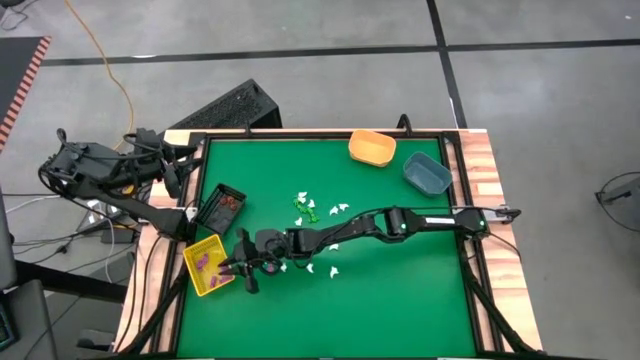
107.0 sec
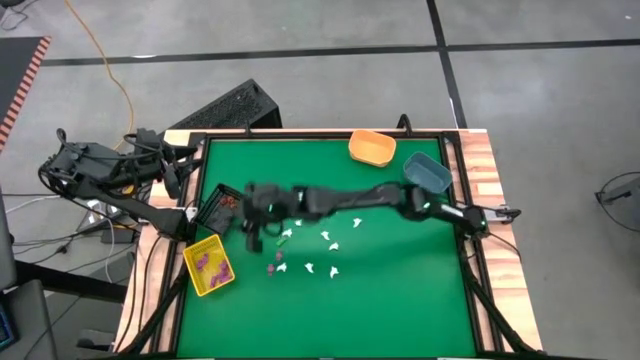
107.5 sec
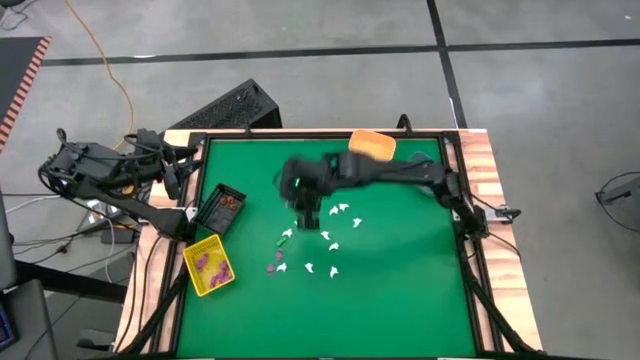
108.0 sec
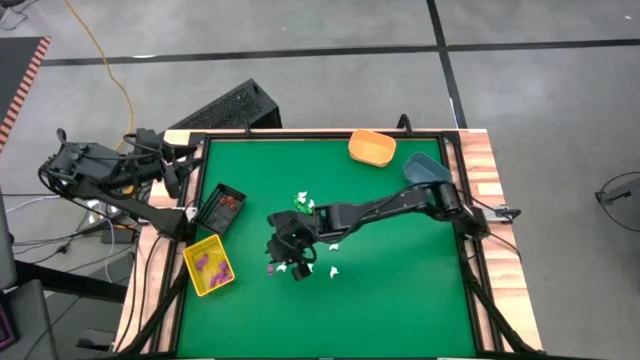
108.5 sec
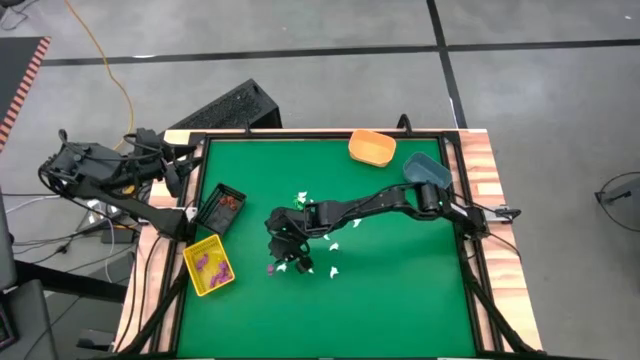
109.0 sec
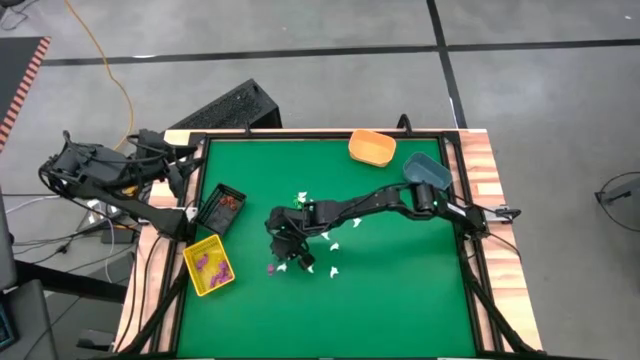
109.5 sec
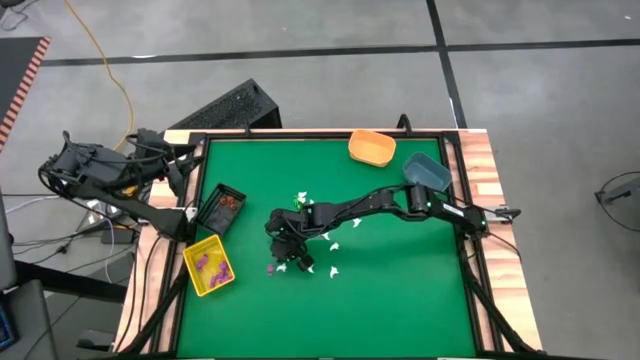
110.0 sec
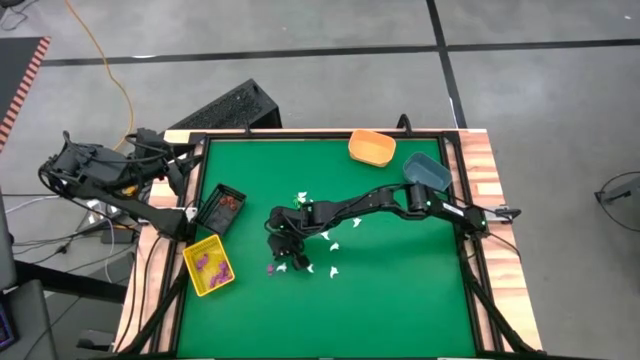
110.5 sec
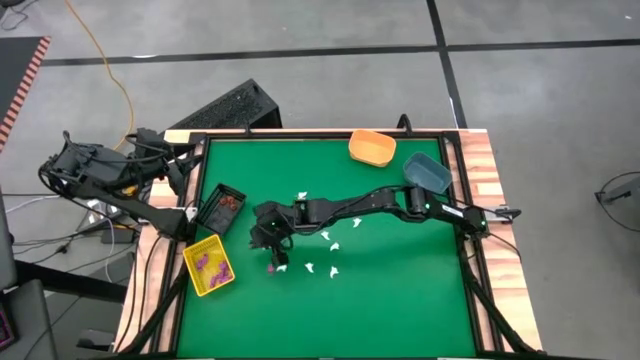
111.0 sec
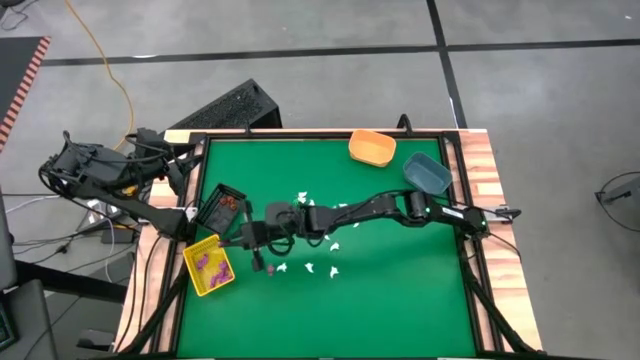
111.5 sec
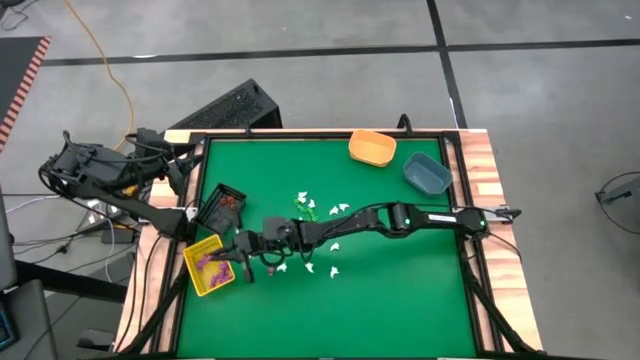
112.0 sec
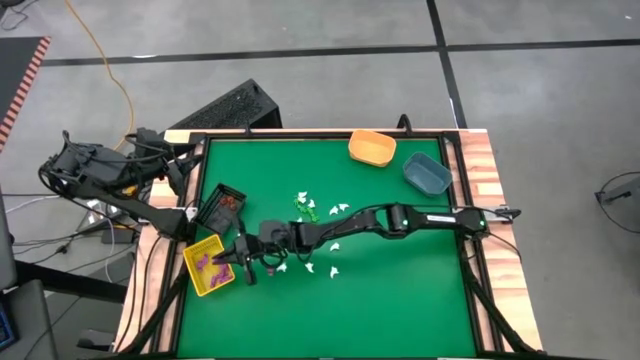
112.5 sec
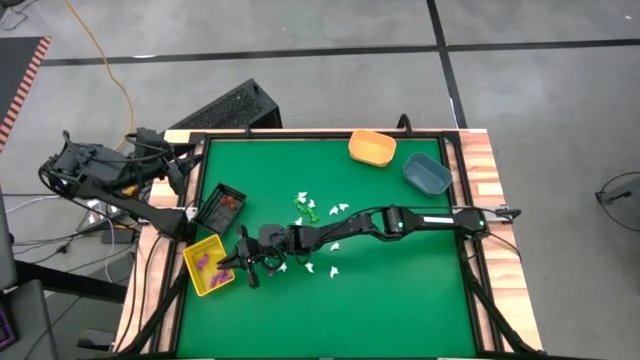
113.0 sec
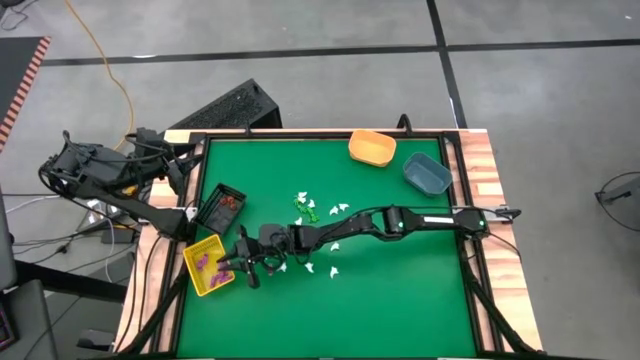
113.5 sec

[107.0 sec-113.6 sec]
Task: Sort Halloween decoration
Put the pink skeleton toy into the yellow bin

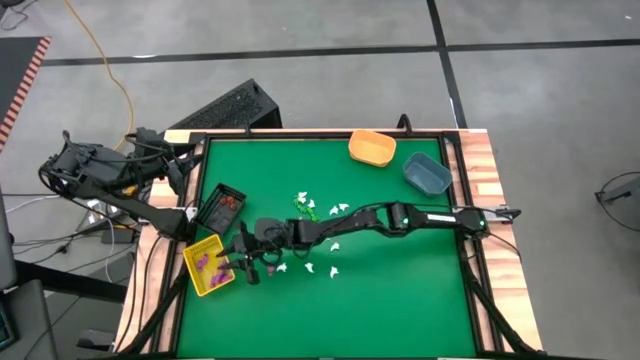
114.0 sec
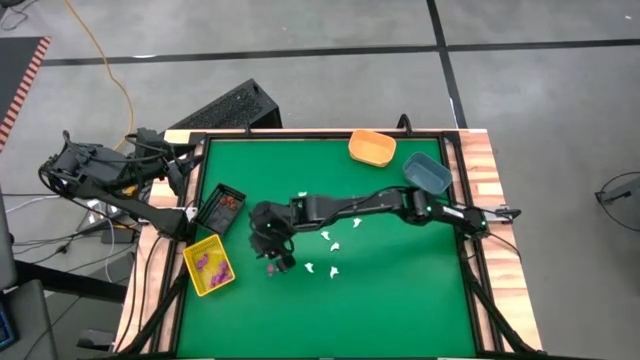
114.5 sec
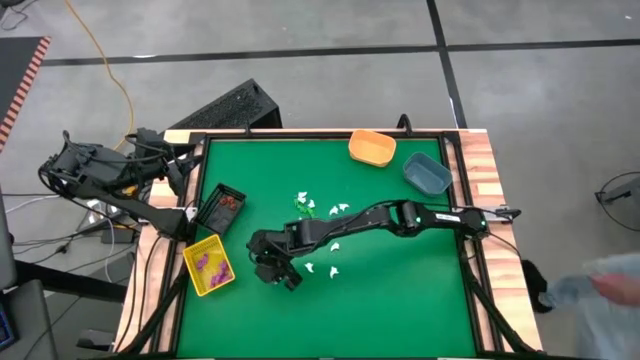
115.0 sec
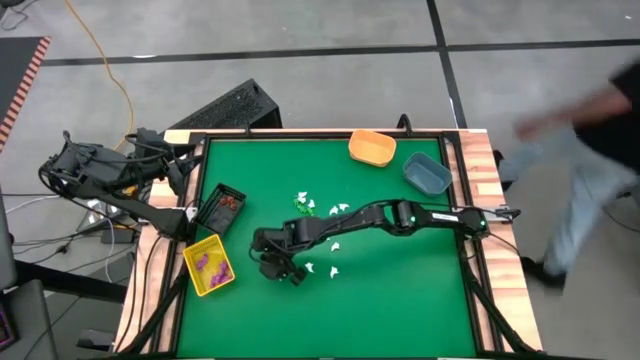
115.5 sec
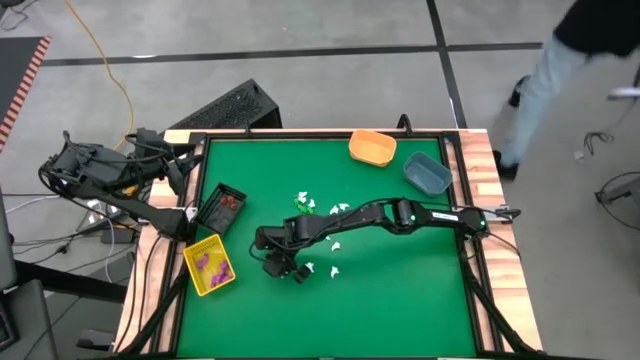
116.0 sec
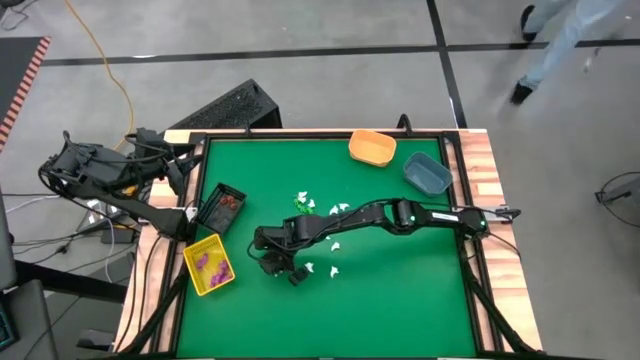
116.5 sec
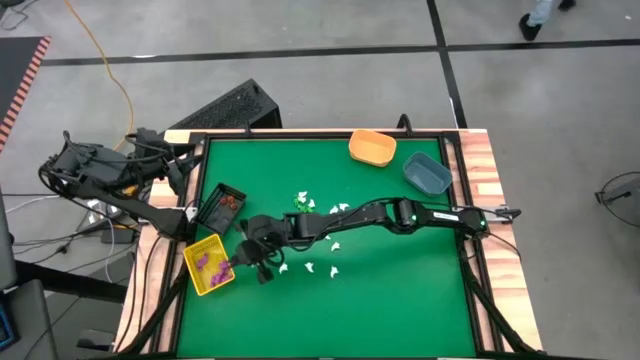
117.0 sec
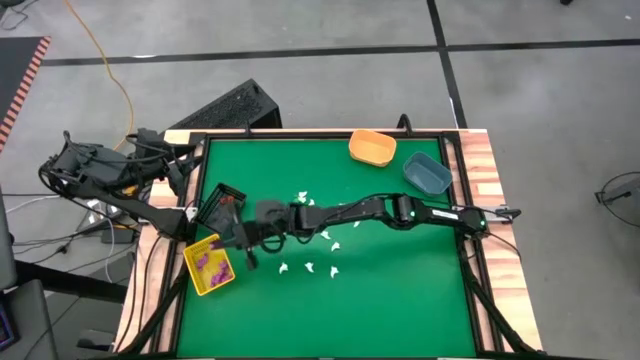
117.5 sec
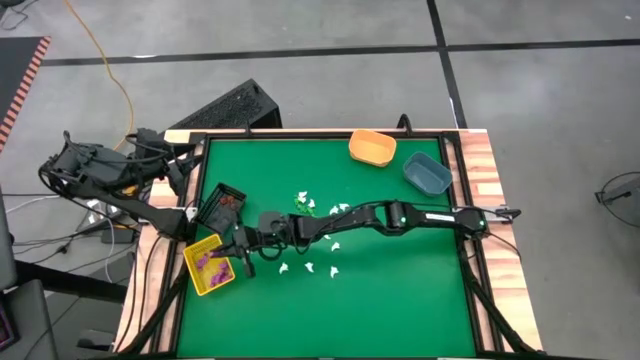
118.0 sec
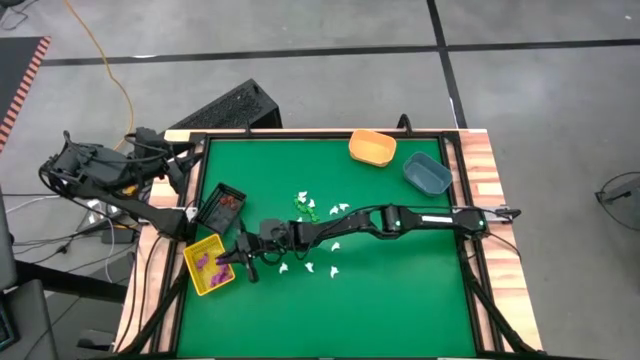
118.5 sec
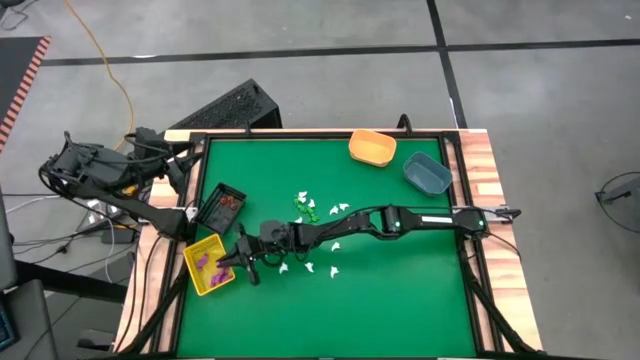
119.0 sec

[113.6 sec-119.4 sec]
Put the pink skeleton toy into the yellow bin

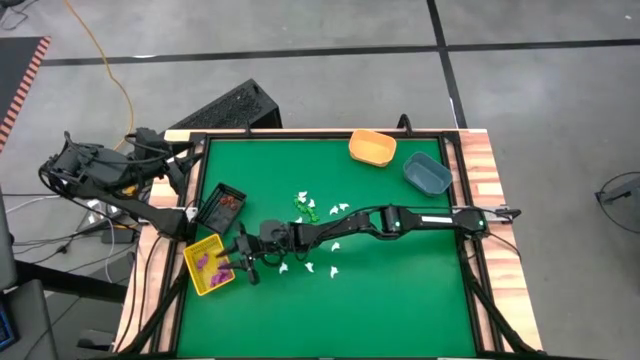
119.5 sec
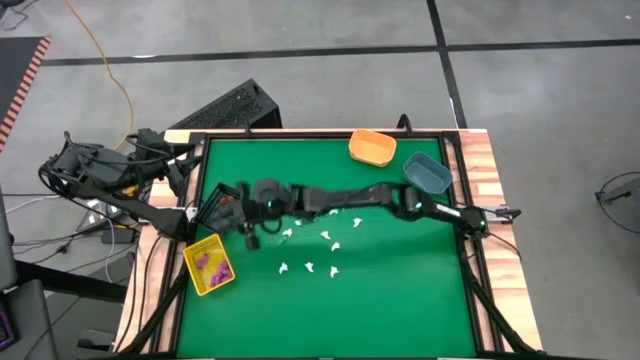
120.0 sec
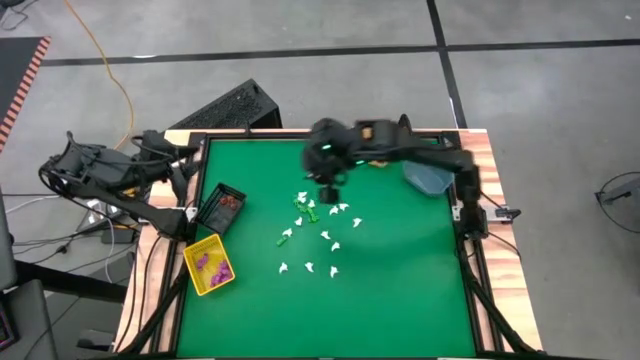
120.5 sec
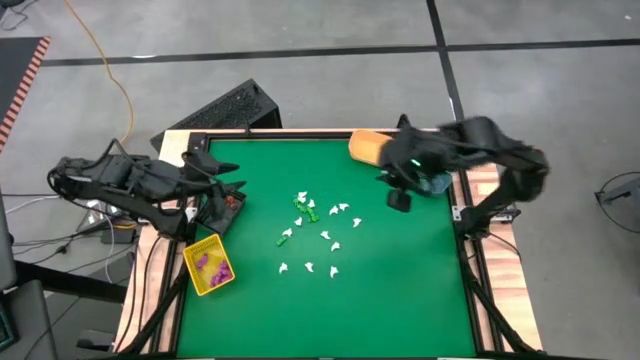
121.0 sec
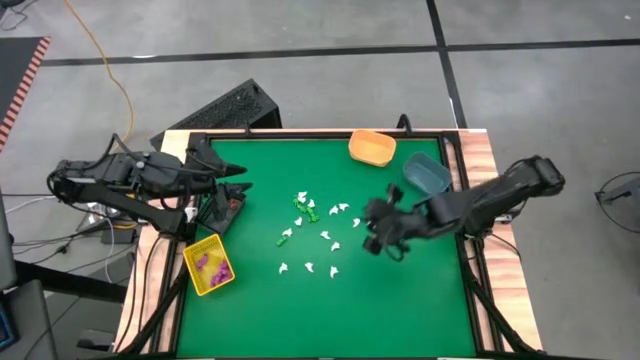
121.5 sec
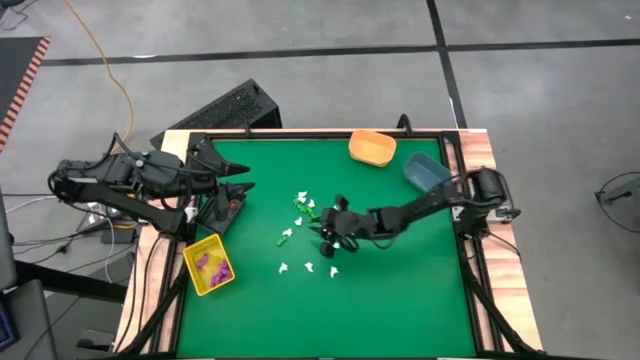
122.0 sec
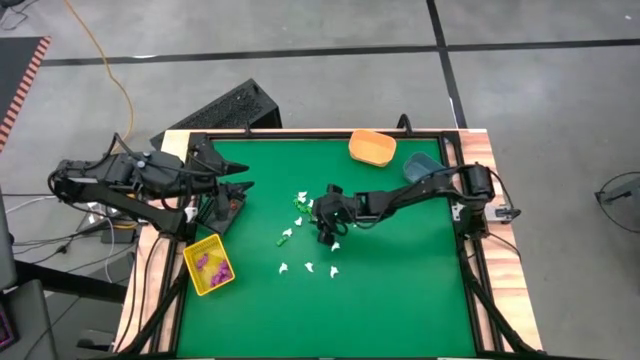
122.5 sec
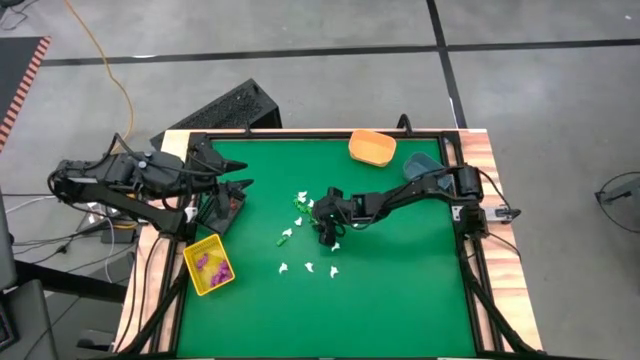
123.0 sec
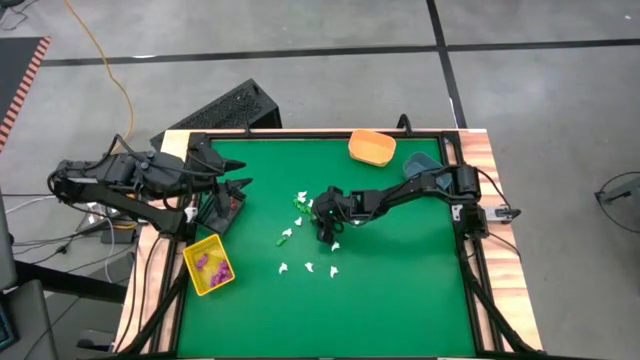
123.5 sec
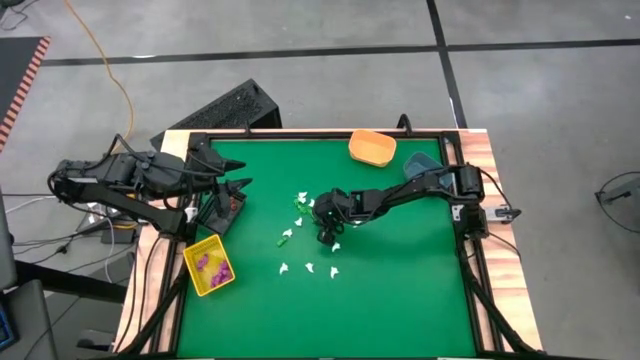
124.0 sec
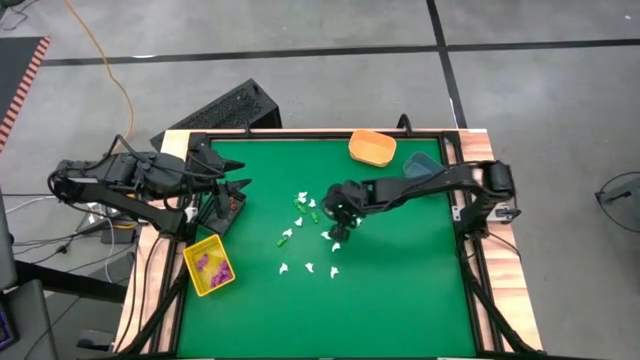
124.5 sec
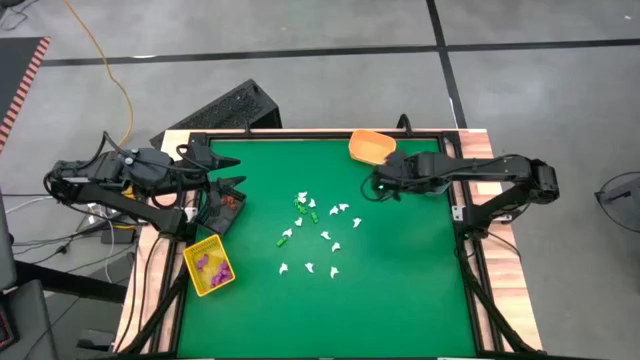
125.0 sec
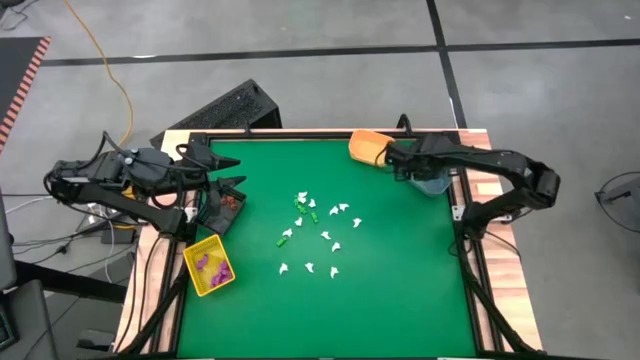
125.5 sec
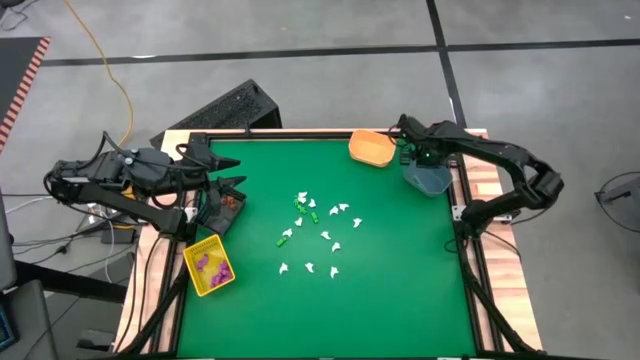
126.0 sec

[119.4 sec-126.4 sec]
Put the green skeleton toy into the gray bin

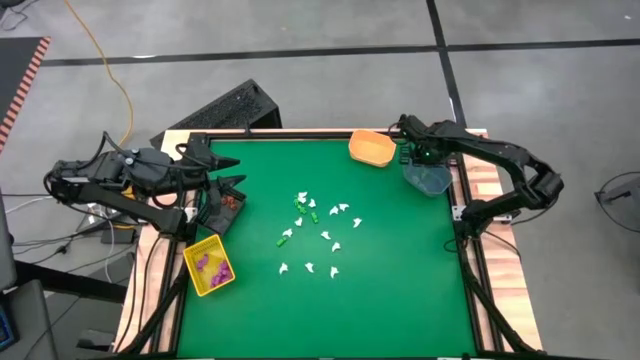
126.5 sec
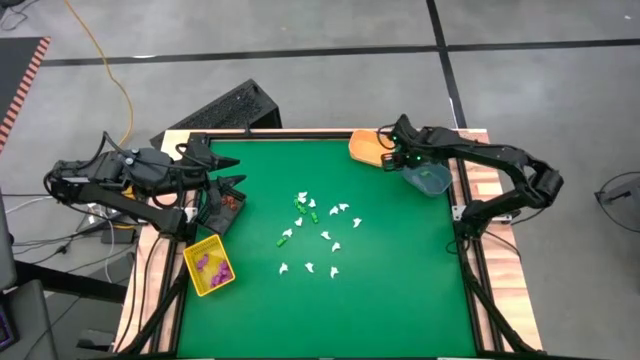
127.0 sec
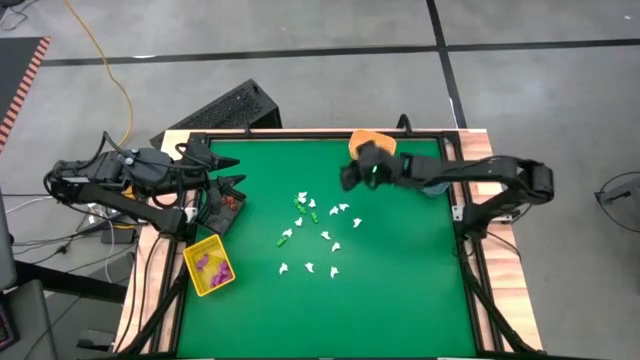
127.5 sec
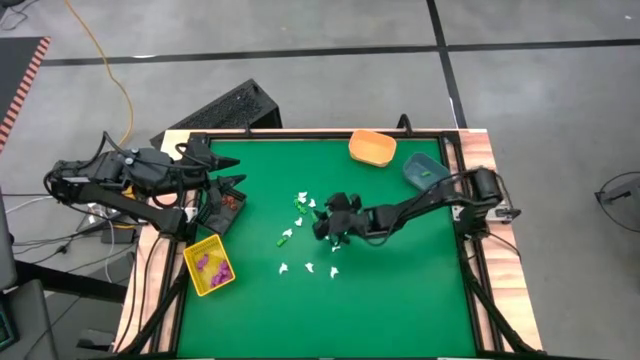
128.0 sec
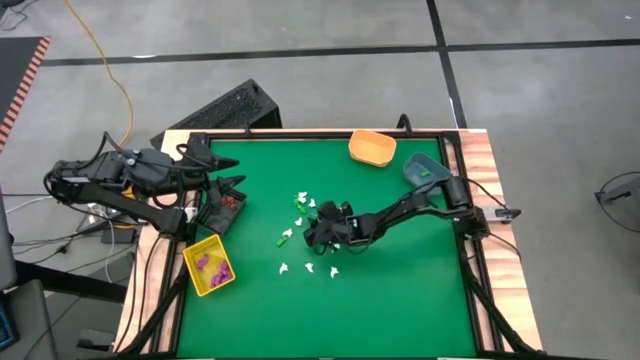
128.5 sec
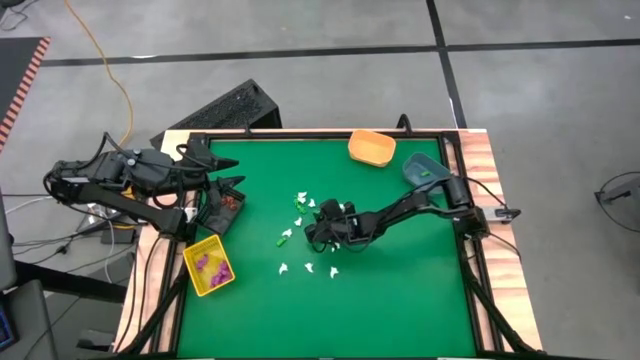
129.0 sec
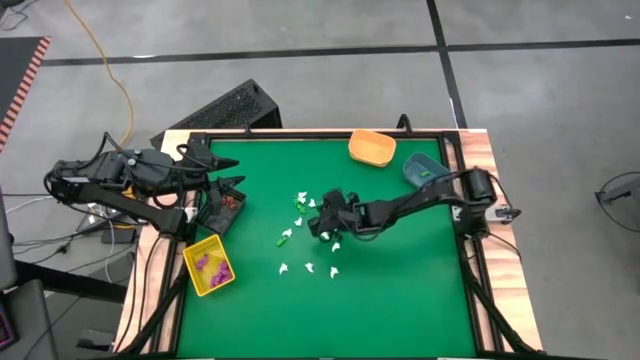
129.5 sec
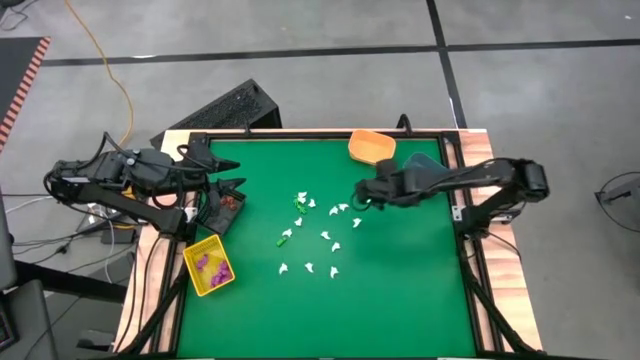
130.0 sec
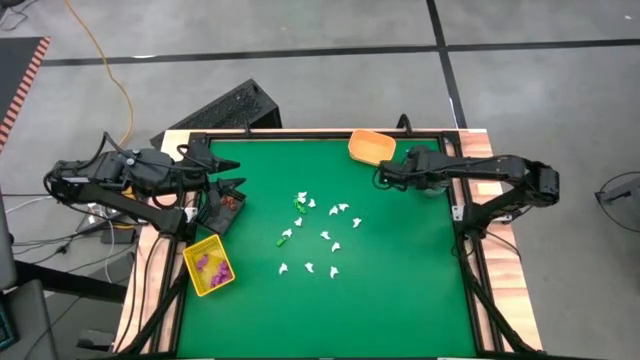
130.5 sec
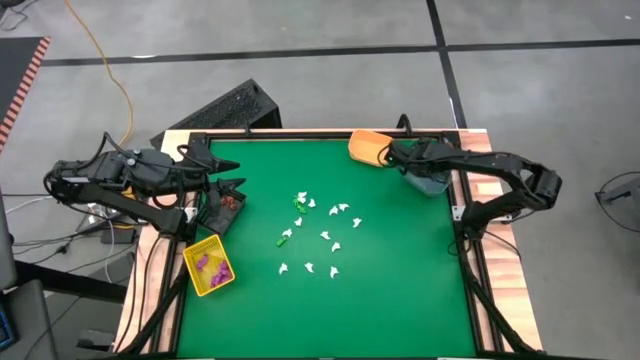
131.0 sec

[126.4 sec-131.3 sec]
Put the green skeleton toy into the gray bin
